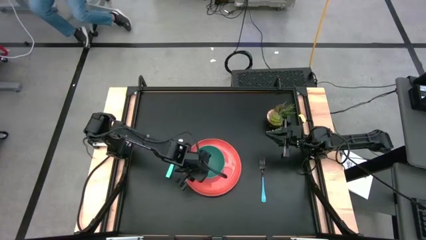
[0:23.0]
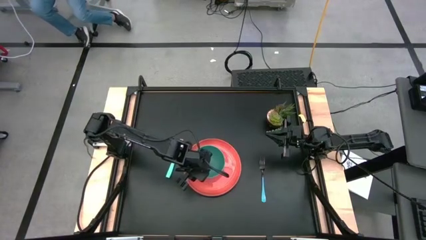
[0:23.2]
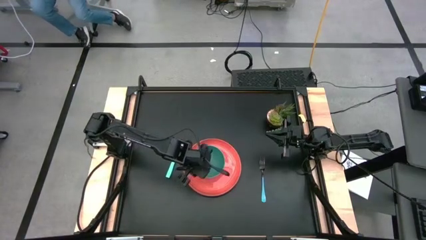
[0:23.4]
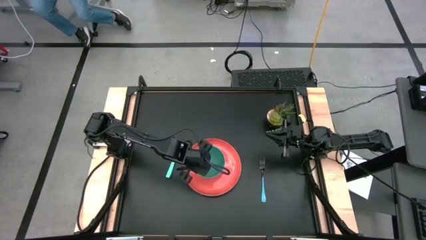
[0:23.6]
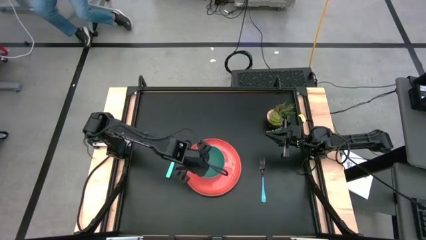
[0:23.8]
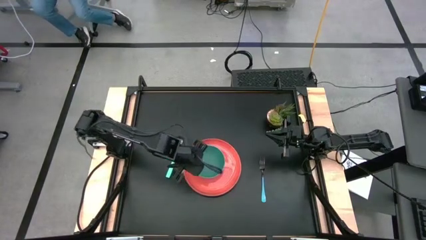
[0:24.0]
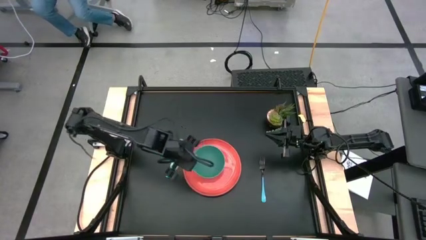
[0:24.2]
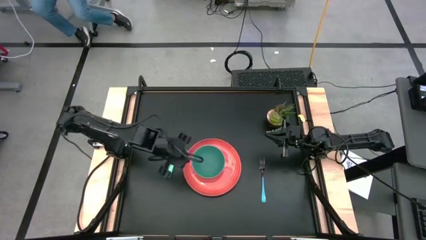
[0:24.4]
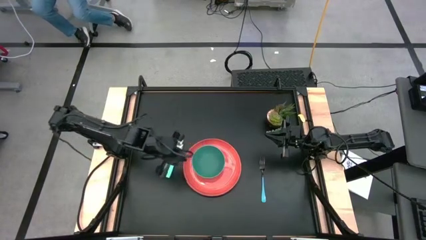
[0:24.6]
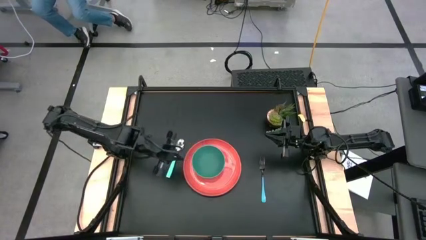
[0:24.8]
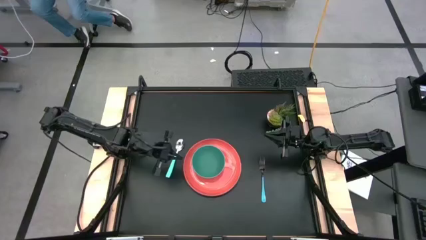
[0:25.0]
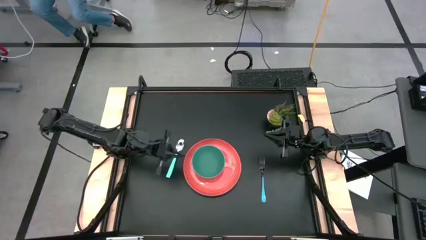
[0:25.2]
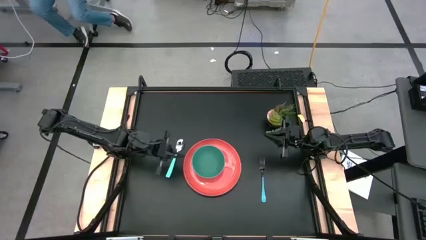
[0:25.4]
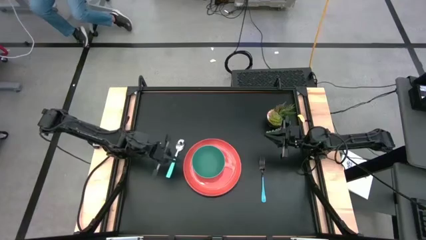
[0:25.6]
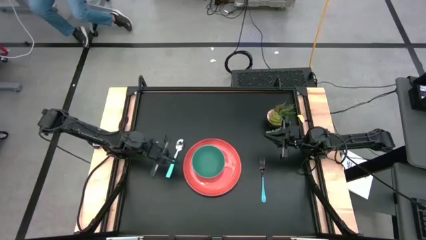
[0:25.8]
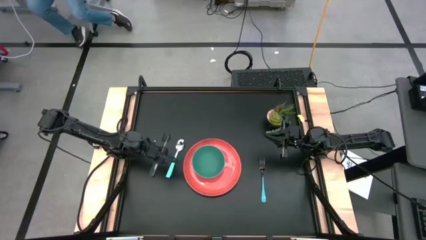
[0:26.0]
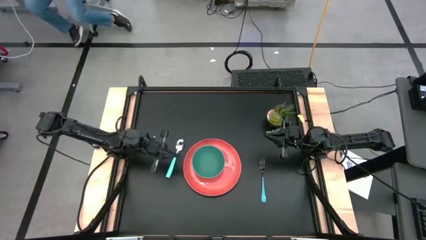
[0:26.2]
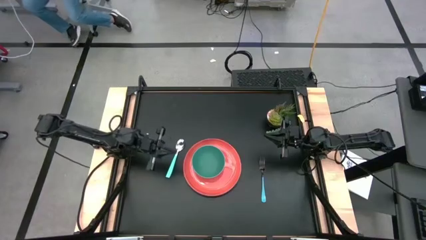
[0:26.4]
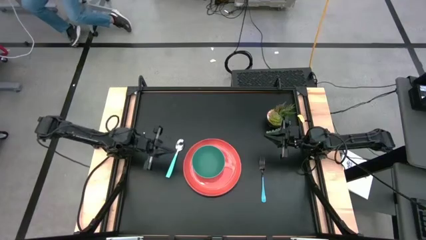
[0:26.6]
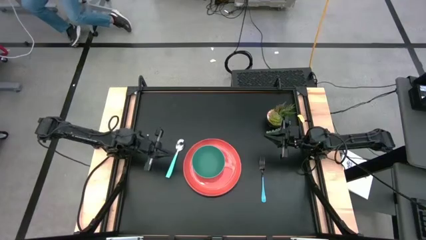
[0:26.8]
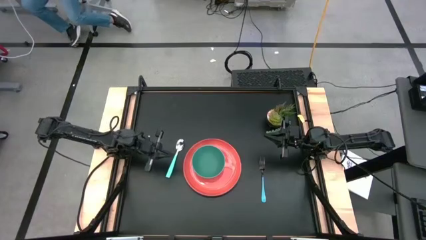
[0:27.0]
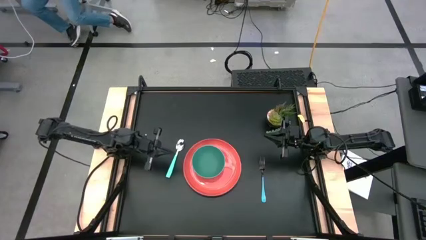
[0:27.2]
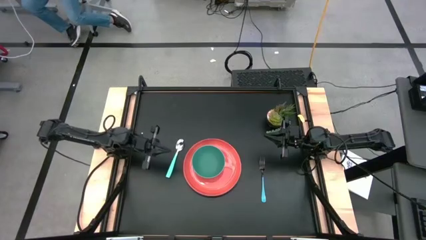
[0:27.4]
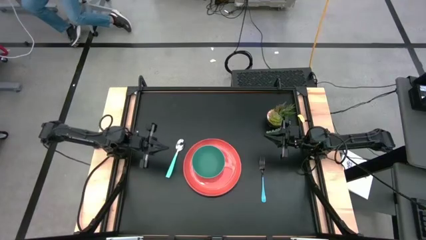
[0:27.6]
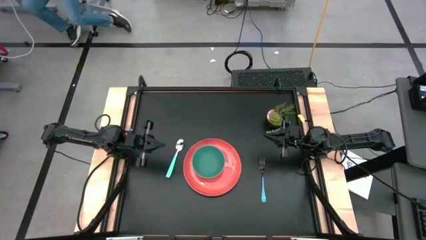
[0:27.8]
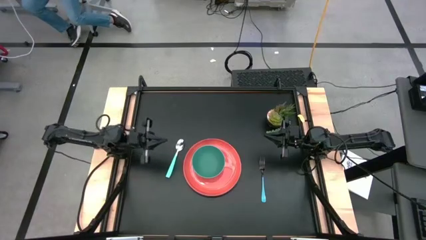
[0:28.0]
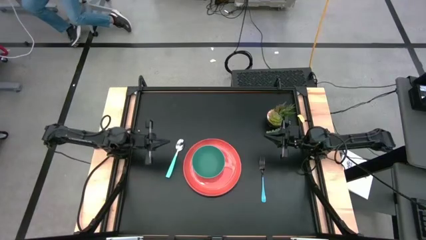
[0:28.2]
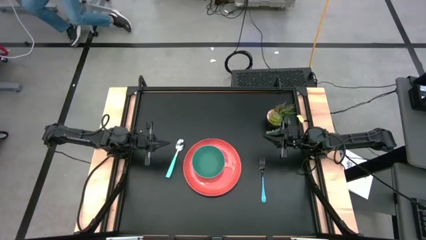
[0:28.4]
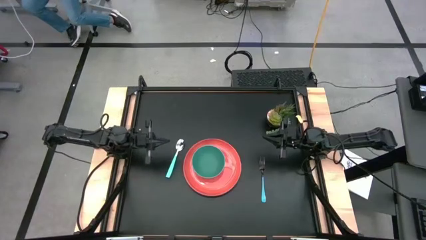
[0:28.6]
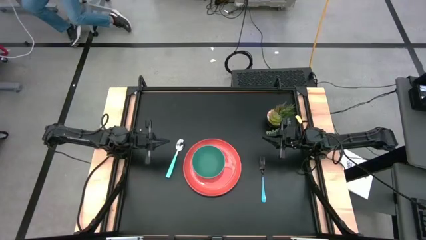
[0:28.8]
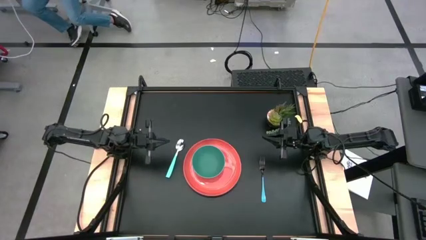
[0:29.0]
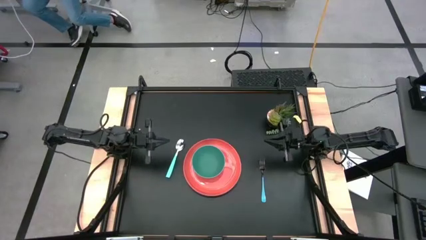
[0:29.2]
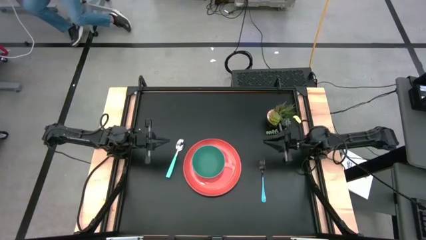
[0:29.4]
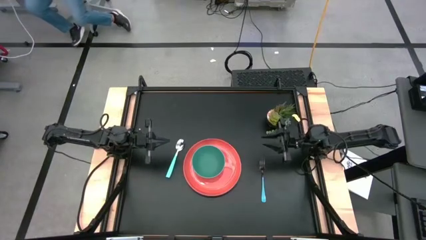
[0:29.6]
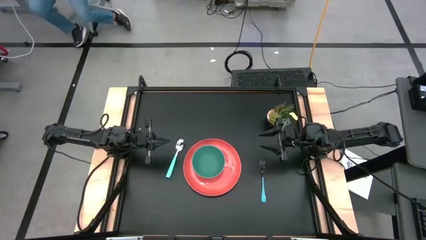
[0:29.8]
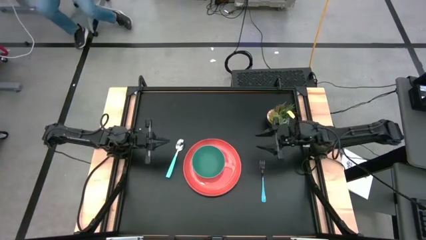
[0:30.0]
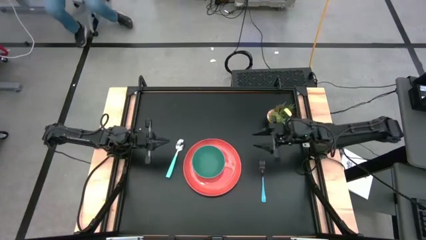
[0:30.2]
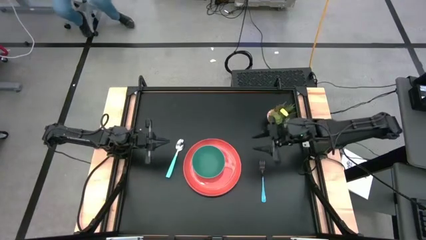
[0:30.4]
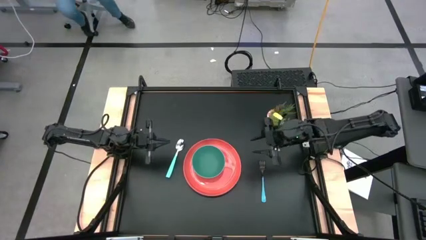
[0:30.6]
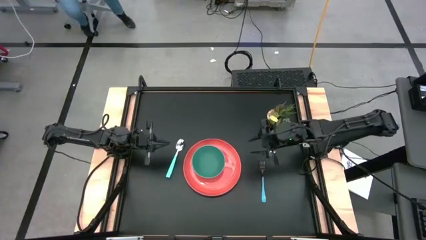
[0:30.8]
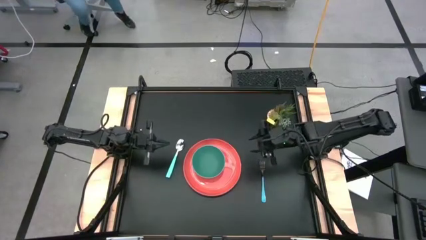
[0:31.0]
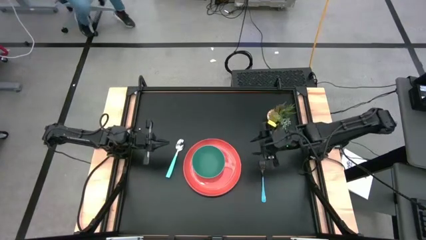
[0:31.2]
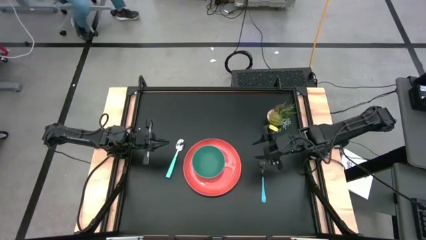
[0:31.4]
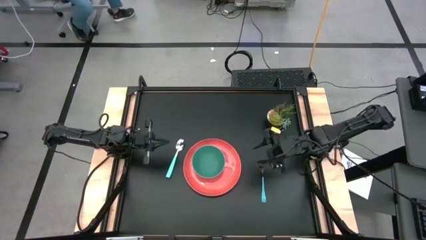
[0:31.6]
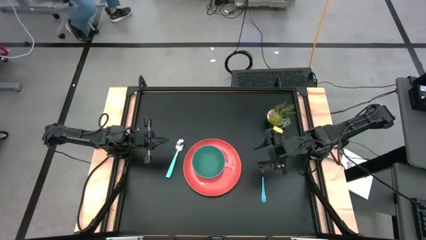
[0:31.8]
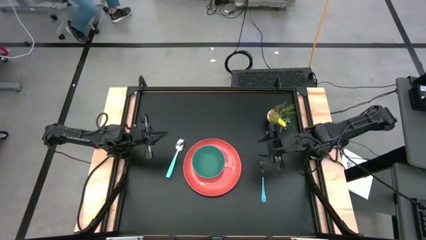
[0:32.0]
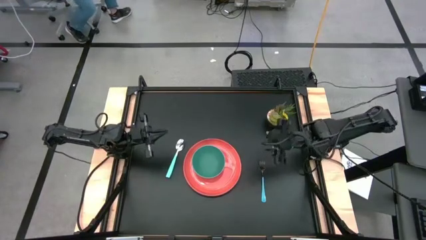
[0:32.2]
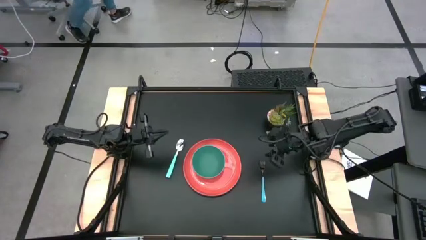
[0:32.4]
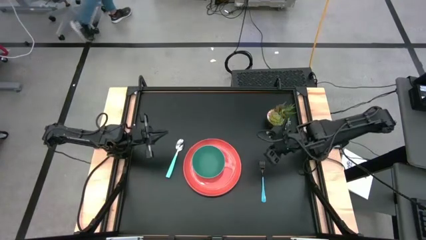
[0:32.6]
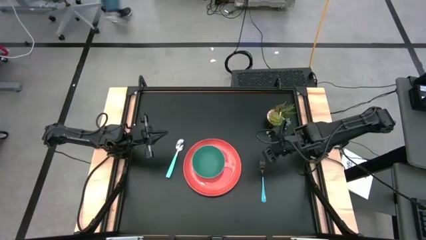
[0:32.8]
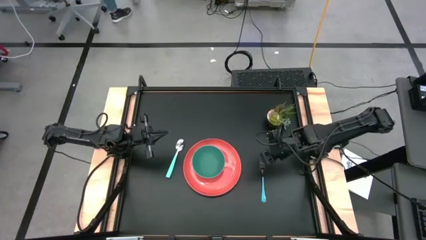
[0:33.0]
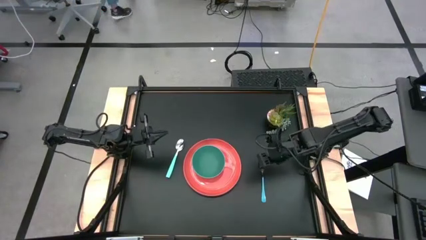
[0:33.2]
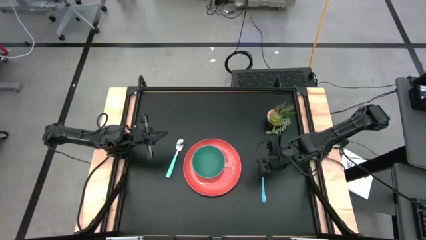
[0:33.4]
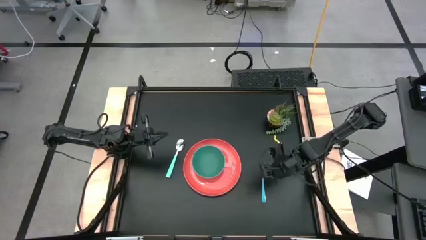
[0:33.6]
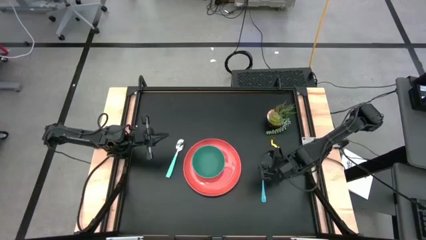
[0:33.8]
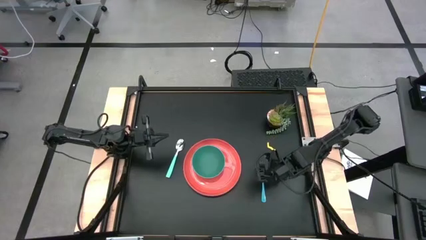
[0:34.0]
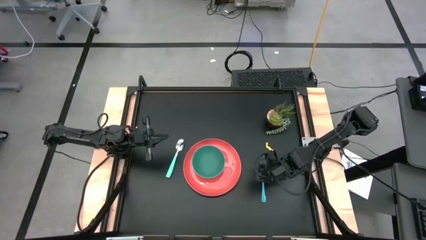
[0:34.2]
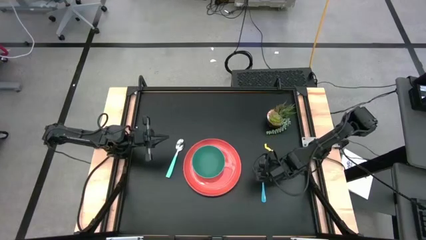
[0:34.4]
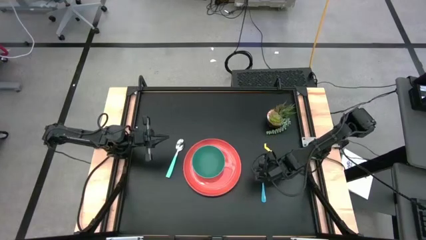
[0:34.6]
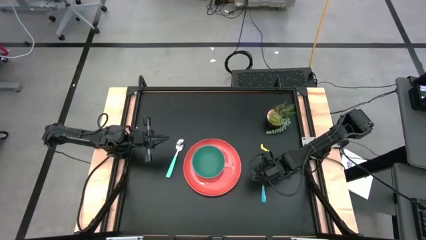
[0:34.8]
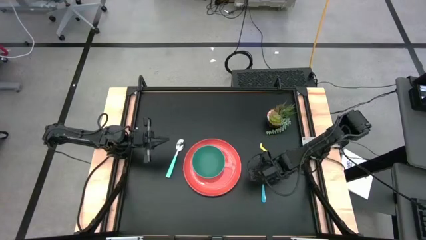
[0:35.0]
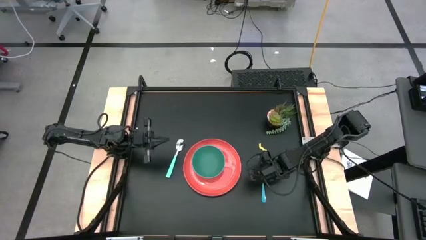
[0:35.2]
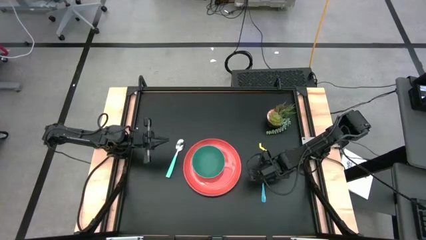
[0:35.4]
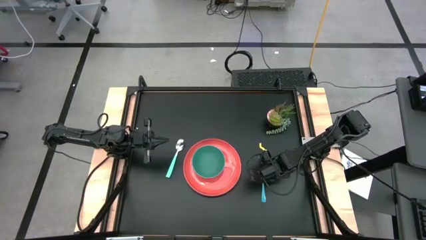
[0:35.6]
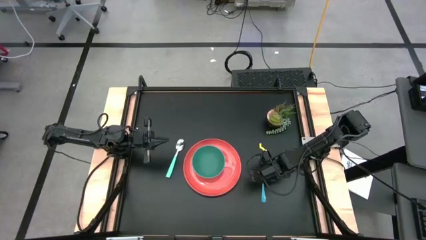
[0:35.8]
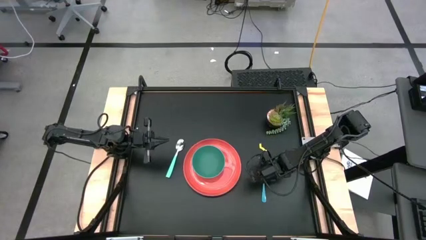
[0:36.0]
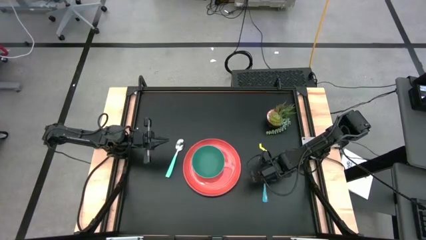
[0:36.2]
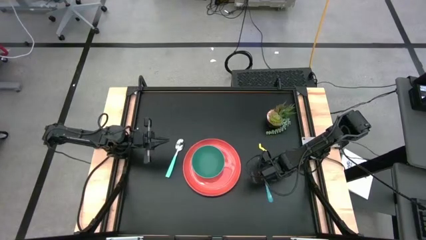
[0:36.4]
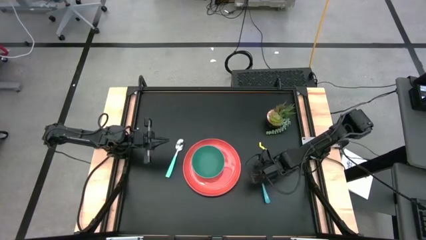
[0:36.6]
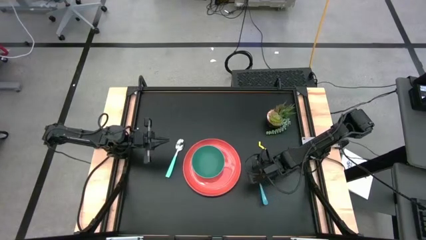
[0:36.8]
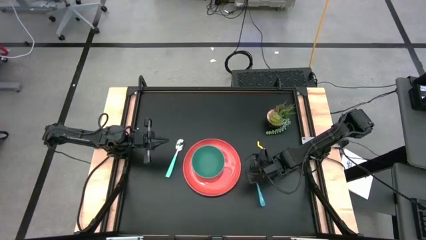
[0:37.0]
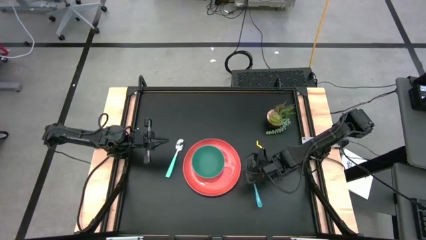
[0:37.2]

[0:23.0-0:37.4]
Task: Set table place
Put the blue fork on the orange plate to the right of the green bowl

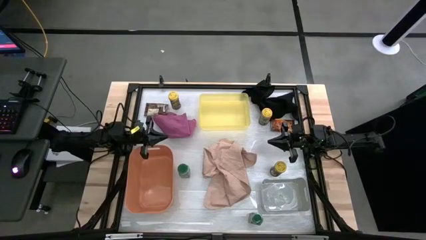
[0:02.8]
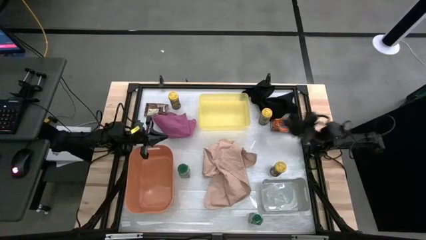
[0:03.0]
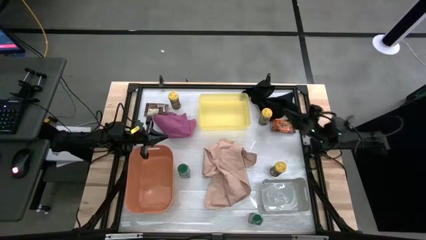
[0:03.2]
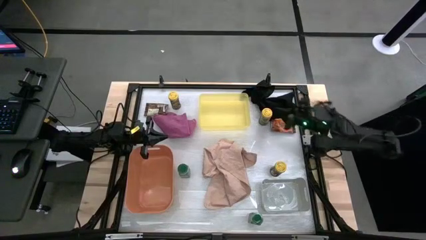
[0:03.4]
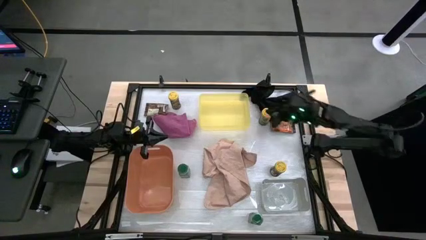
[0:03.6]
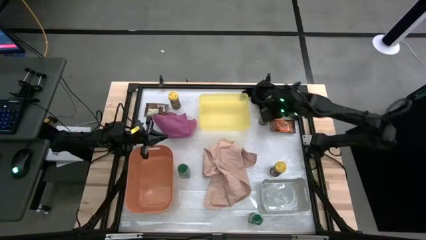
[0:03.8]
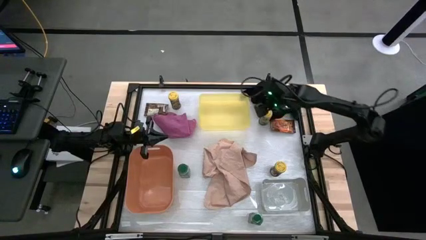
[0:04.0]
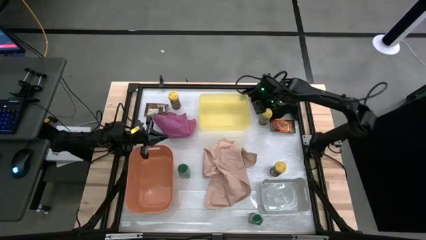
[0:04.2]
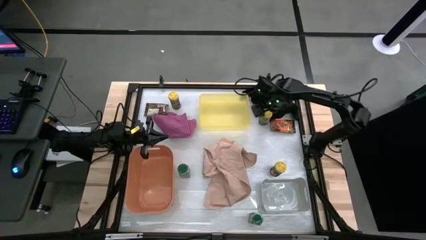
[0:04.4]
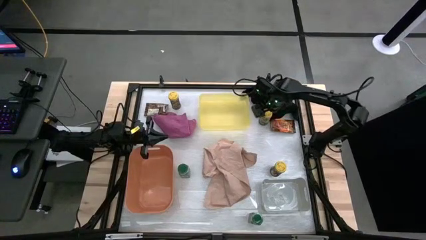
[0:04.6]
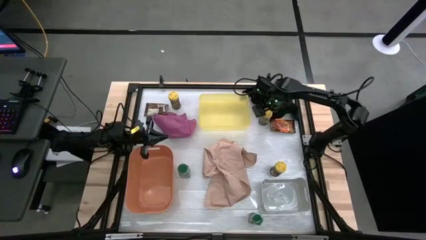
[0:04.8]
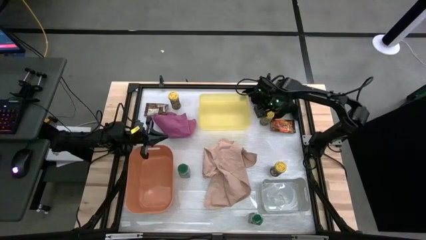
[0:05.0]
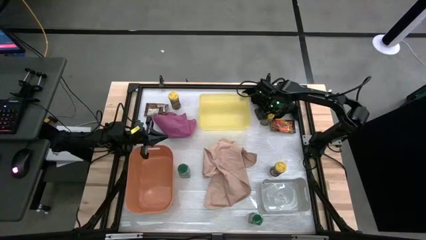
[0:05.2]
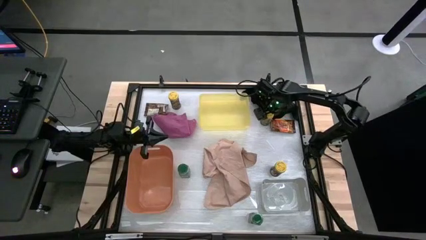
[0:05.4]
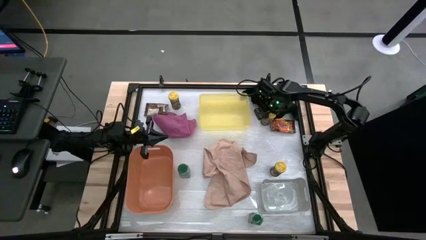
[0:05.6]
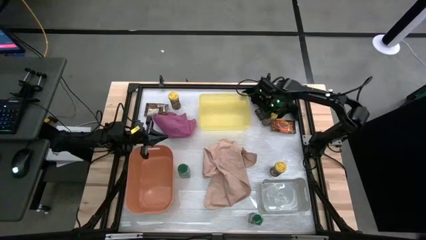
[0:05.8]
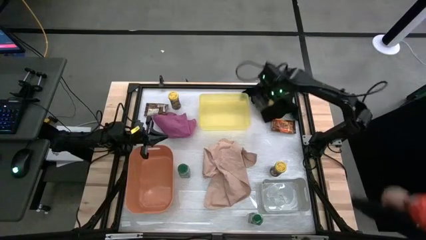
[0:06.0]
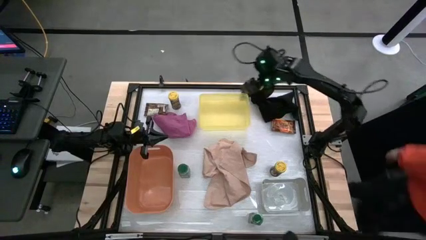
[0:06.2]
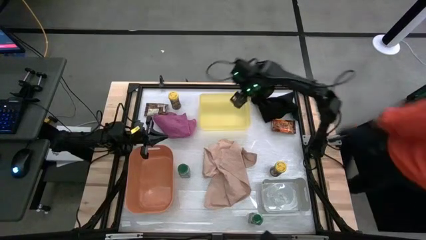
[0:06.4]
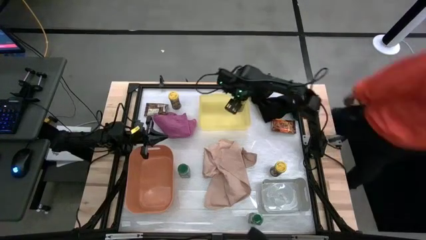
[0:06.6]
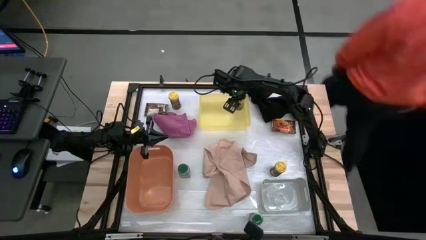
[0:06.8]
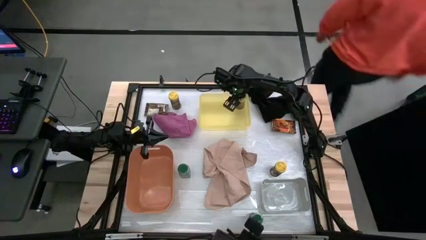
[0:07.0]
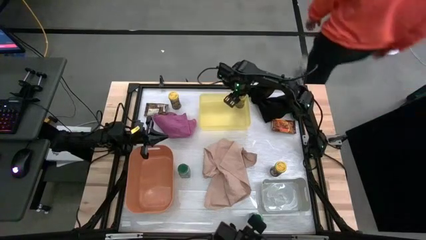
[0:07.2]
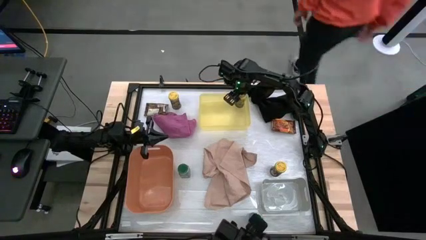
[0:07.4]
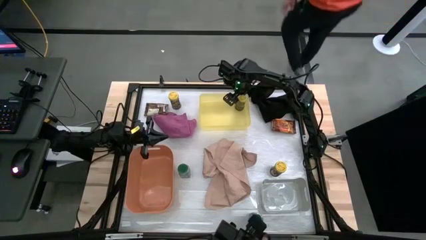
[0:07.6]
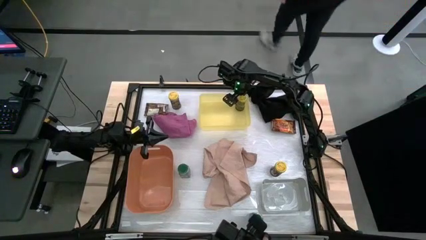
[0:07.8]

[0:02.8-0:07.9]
Task: Sort spices by type
Put the middle right yellow spice bottle into the yellow bin
